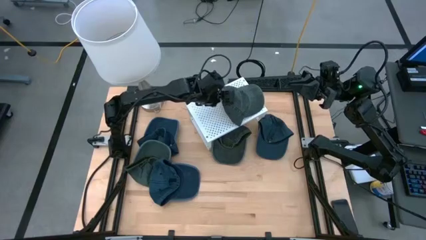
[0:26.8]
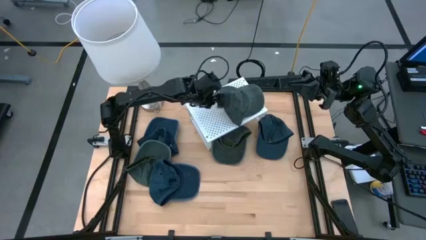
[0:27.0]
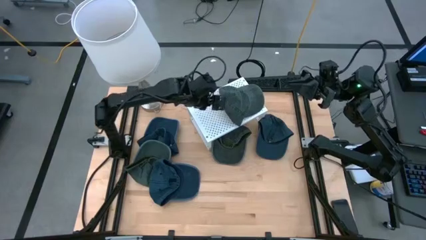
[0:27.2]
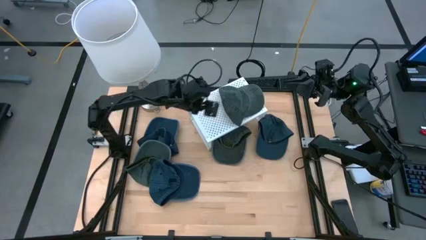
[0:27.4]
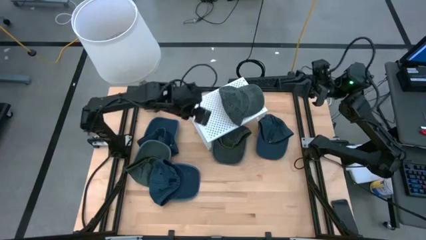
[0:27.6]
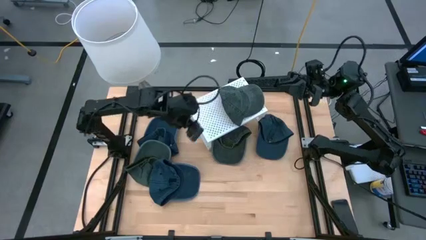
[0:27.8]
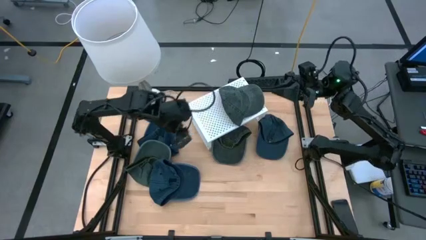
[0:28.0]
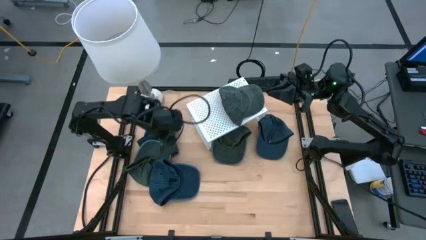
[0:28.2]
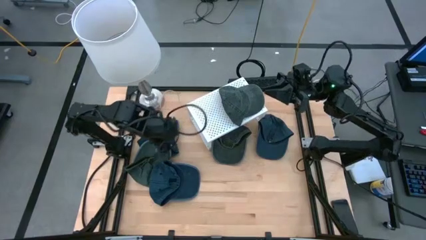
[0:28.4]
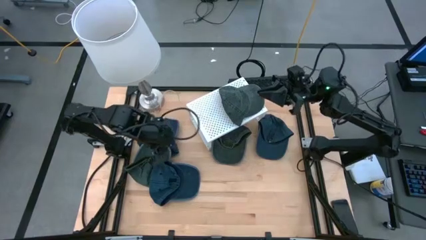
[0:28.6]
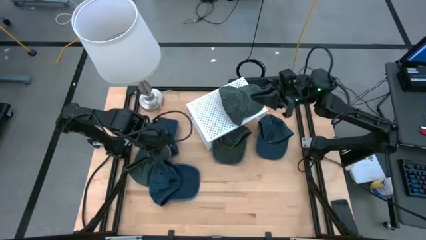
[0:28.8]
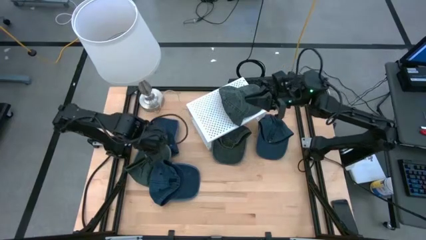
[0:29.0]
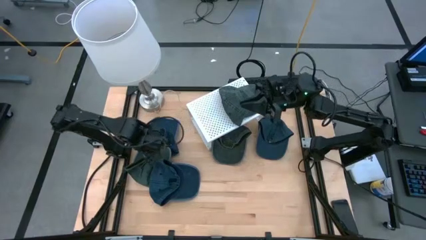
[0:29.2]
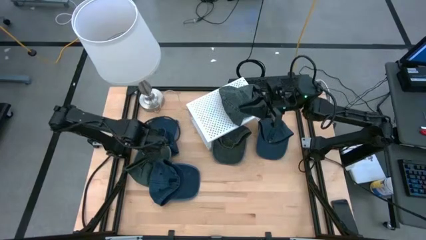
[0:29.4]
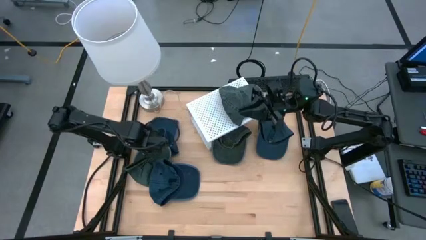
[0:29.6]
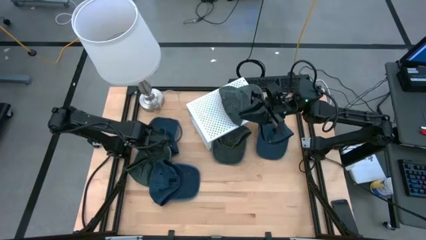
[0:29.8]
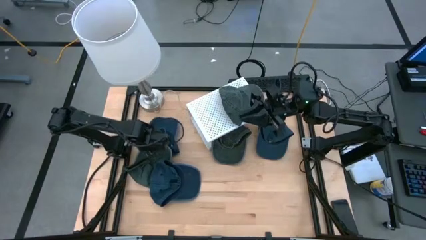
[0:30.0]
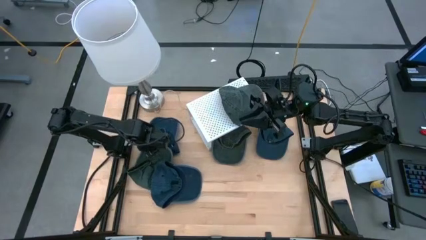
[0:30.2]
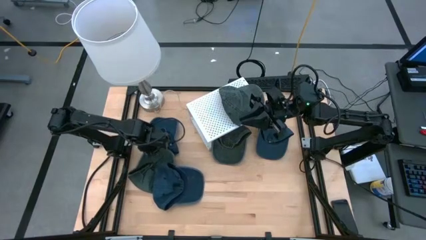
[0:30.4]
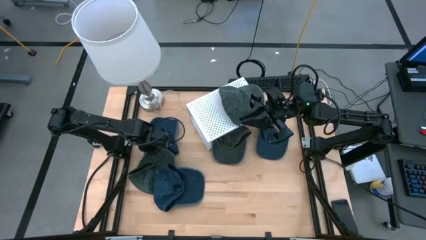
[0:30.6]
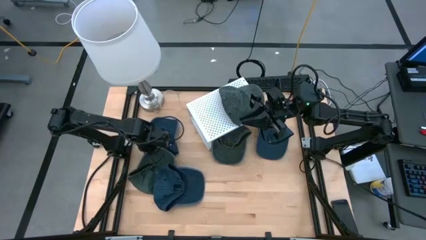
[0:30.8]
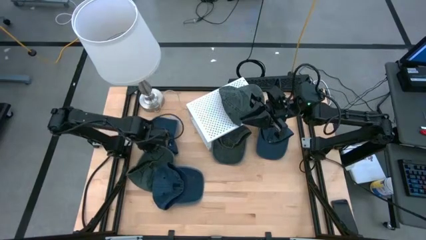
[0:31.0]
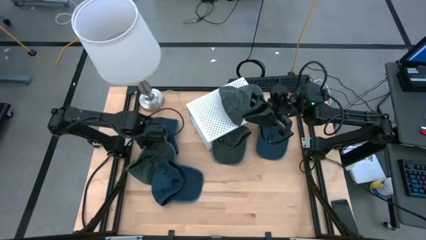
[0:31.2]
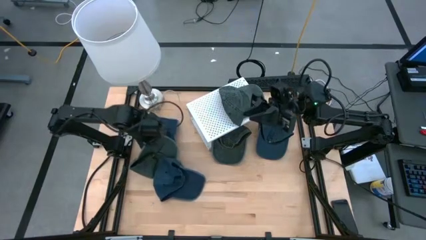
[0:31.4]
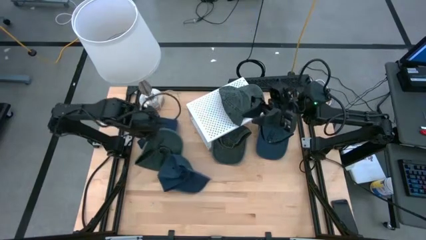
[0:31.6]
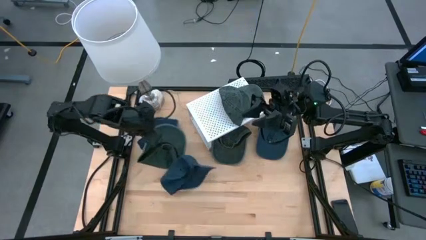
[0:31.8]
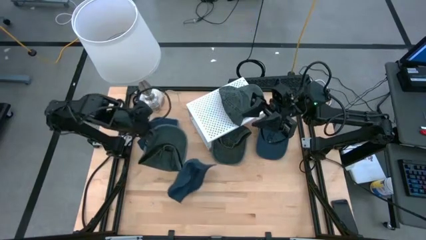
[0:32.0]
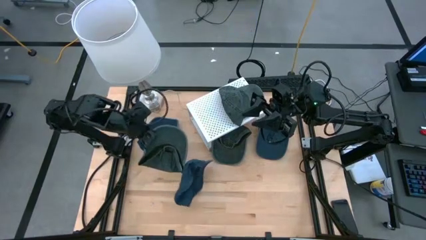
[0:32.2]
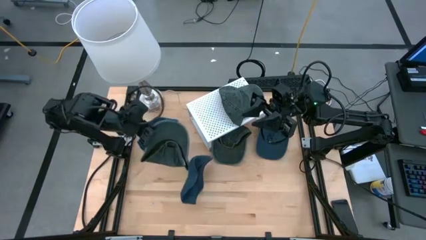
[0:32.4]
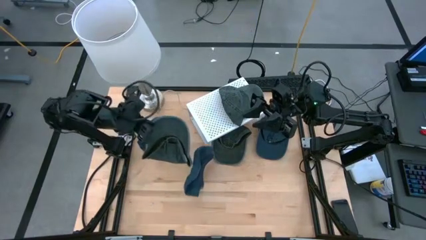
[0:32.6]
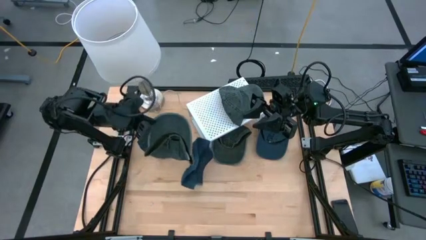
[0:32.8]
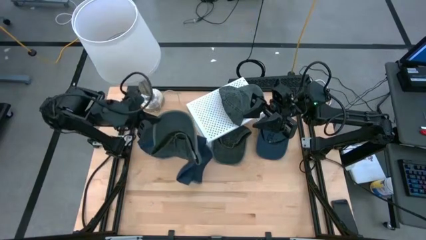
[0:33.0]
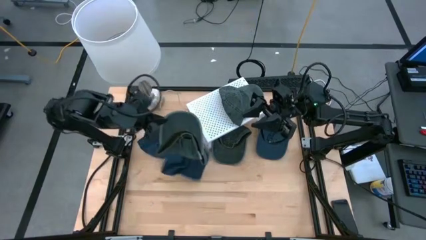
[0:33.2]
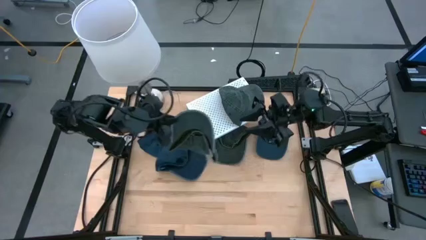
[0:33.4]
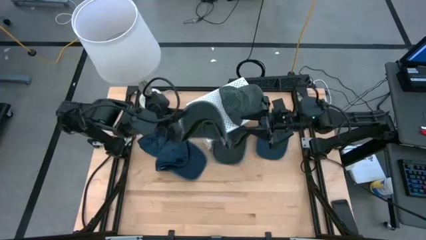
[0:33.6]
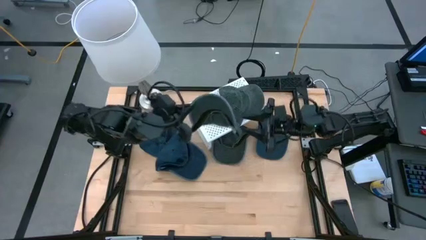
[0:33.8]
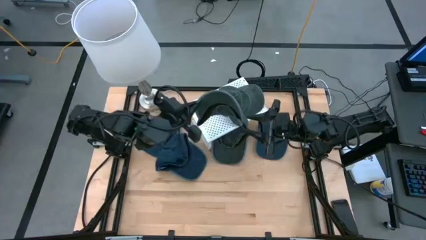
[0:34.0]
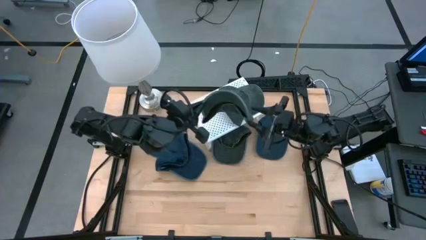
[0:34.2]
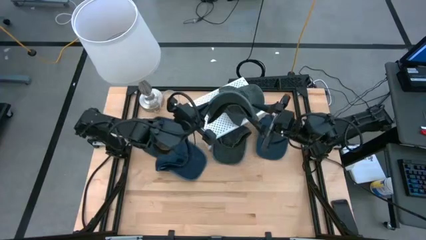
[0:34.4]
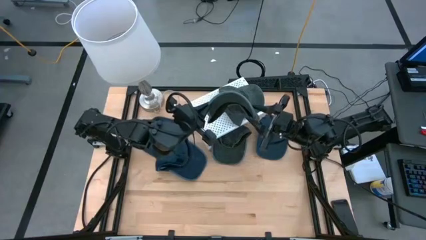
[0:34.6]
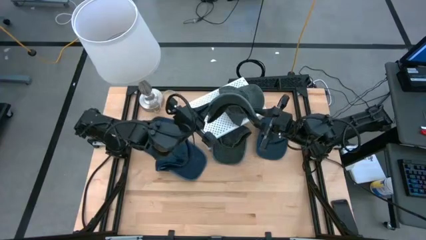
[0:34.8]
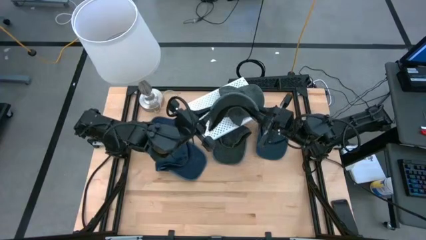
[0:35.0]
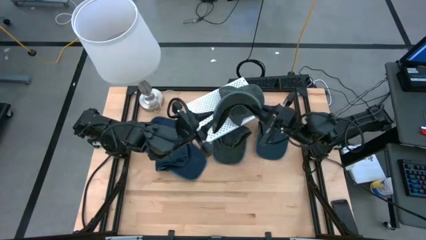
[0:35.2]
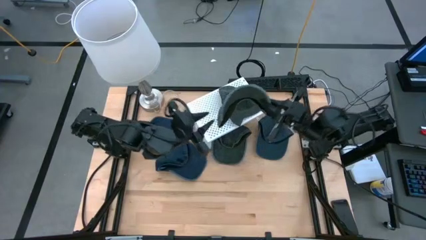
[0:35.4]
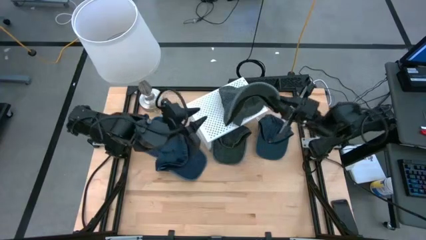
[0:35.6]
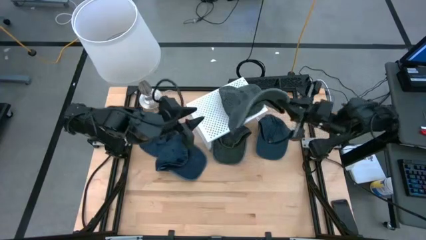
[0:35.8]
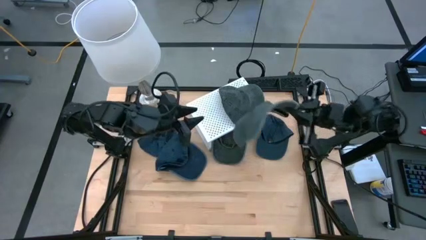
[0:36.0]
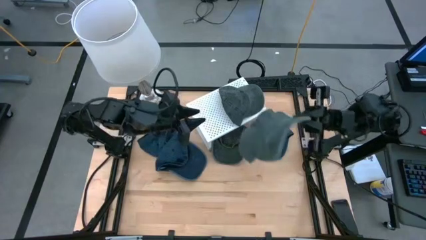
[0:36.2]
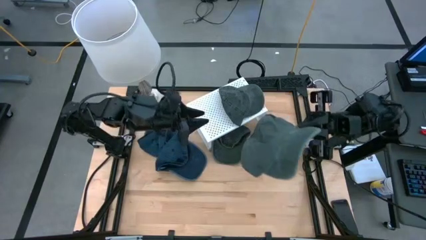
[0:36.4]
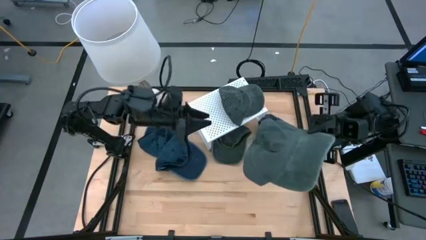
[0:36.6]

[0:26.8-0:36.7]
Task: Pick & Place hat
Stack the green cap on top of the other green cap on the shelf
